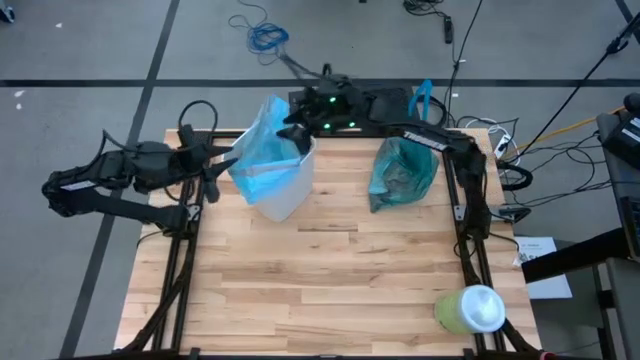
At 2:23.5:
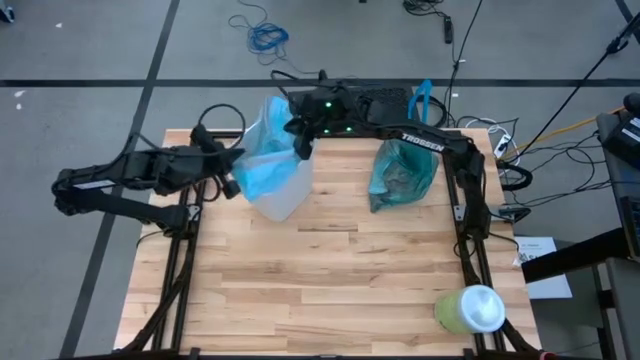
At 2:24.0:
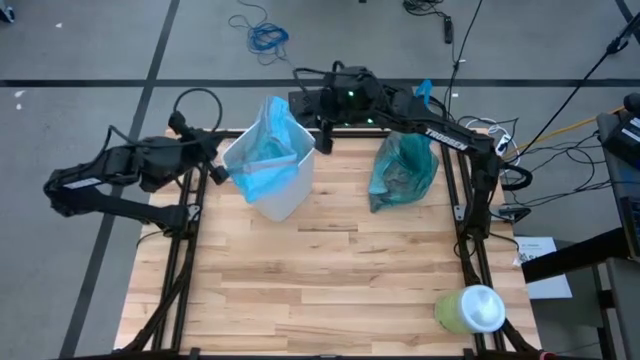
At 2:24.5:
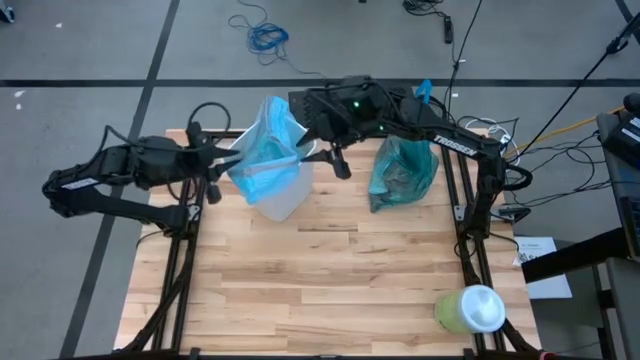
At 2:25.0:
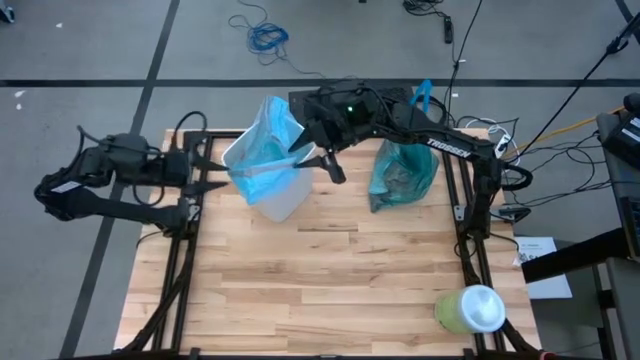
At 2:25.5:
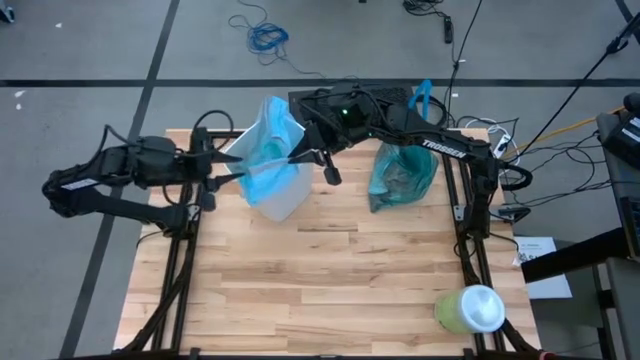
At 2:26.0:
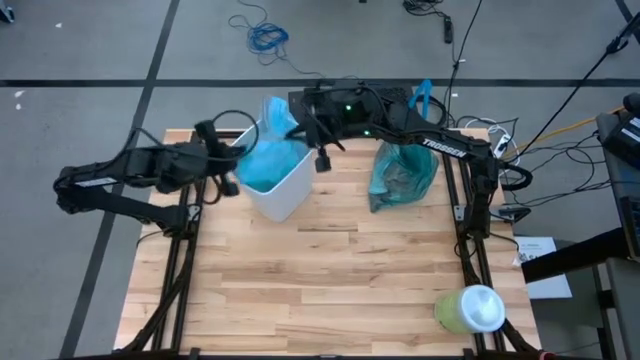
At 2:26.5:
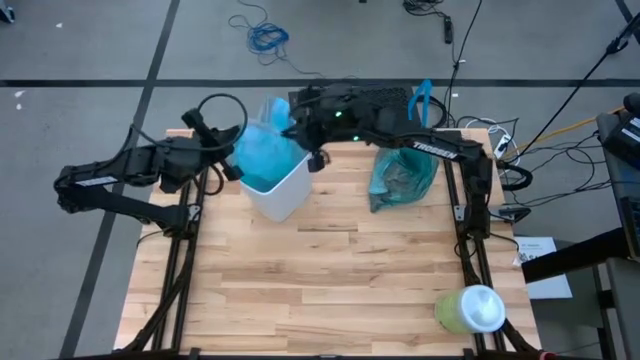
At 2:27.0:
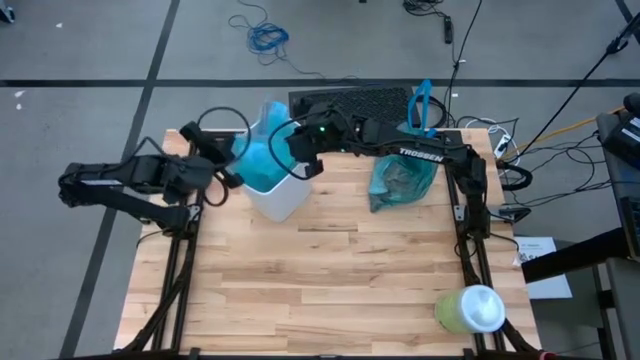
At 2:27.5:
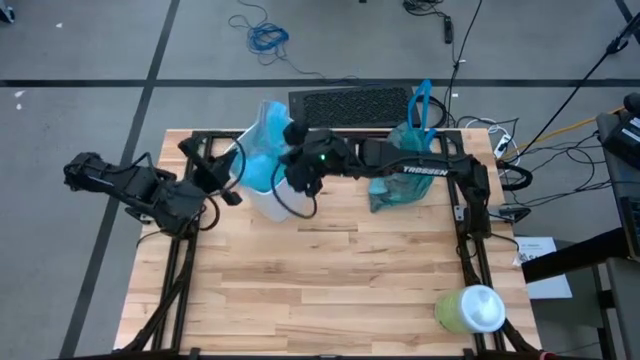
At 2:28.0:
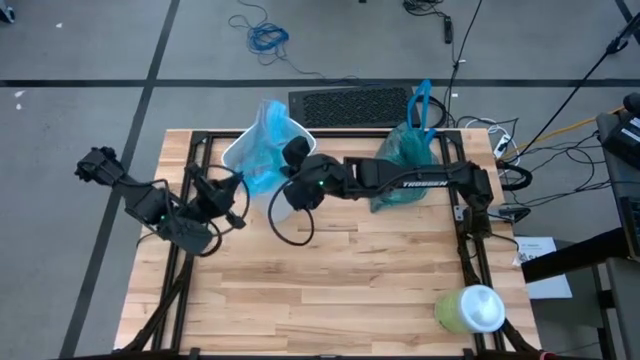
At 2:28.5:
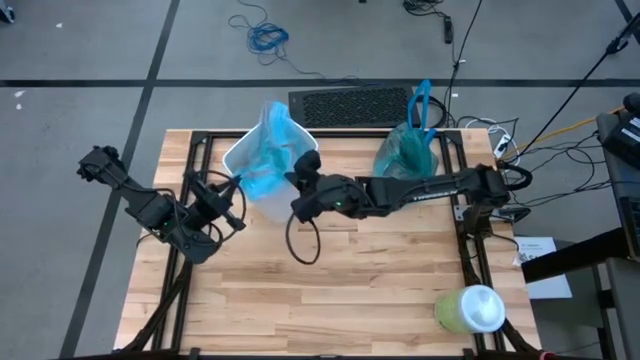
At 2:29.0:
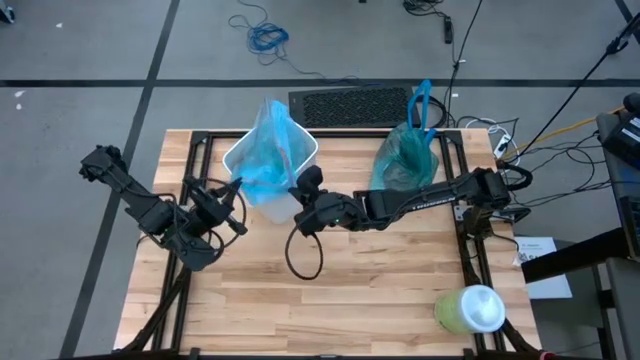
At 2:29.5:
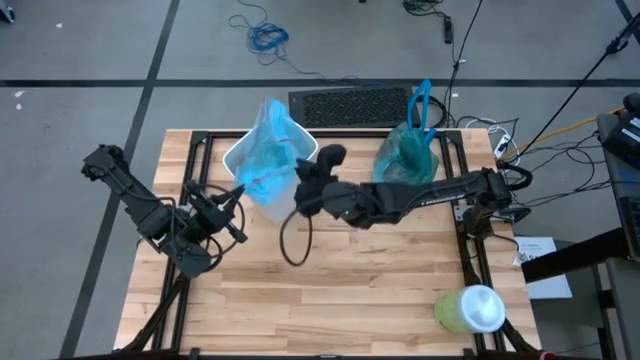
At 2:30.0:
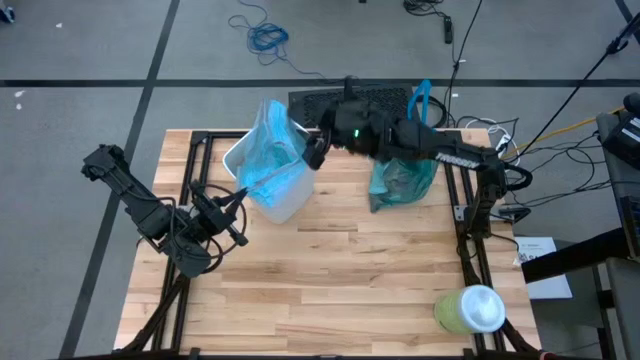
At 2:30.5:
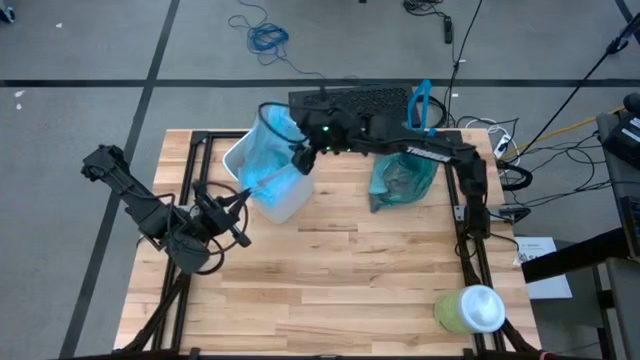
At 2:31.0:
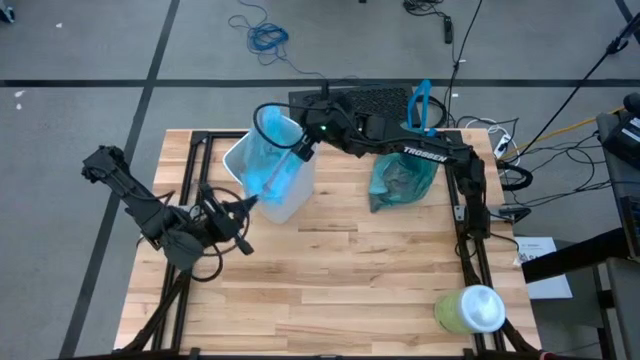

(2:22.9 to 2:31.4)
Task: place trash/remove bag and relplace
Insert a new trash bag into the trash bin

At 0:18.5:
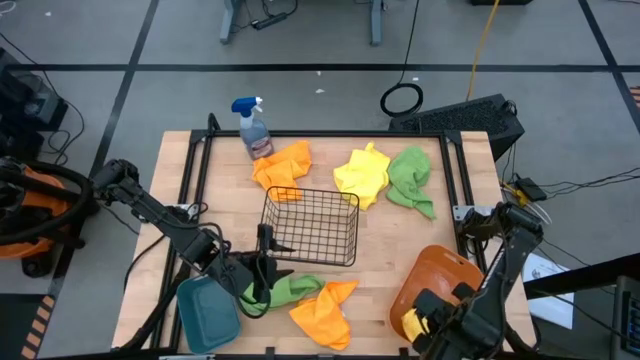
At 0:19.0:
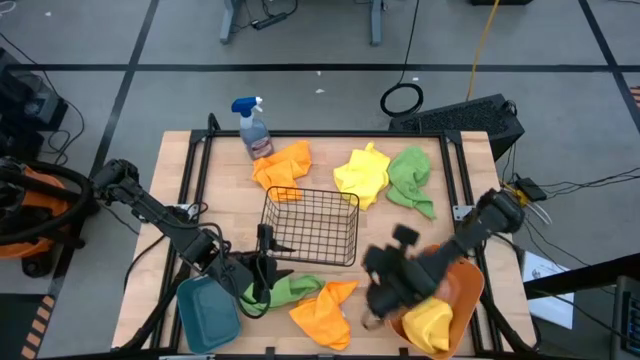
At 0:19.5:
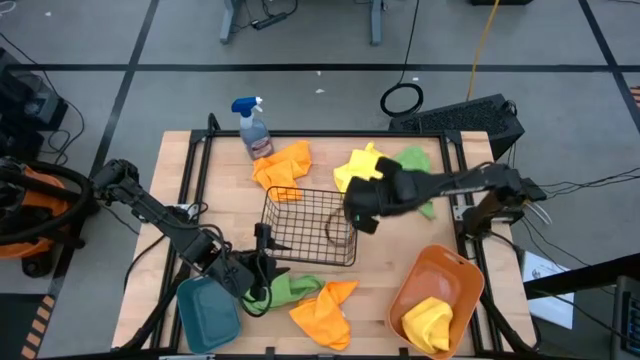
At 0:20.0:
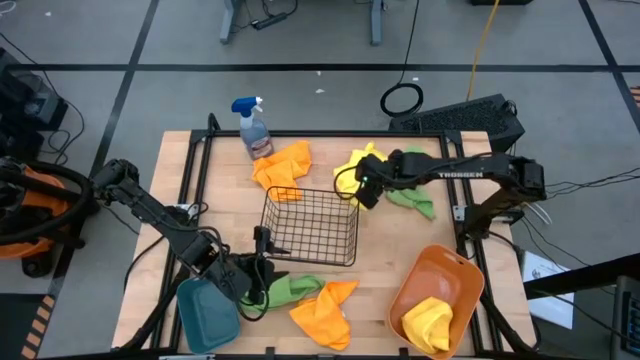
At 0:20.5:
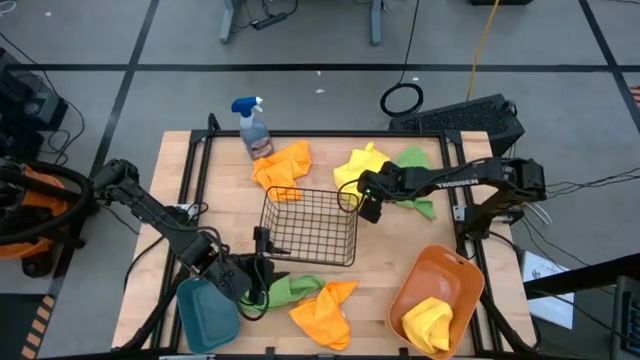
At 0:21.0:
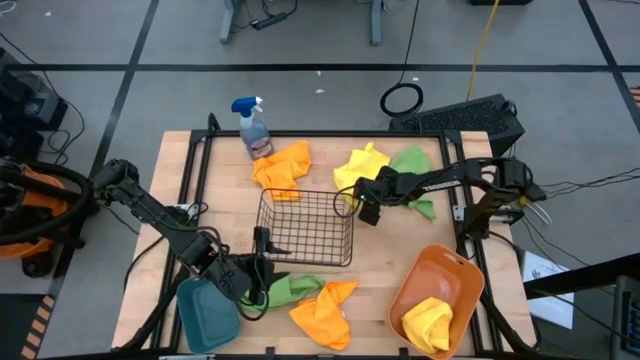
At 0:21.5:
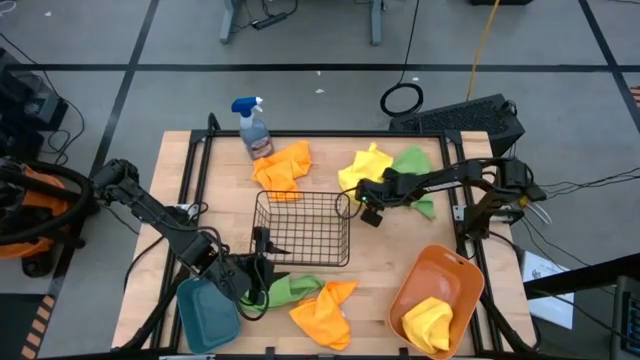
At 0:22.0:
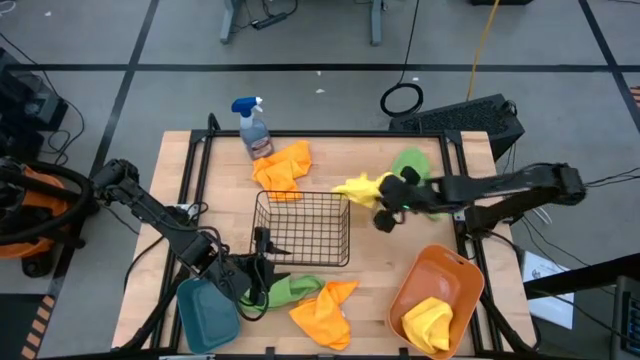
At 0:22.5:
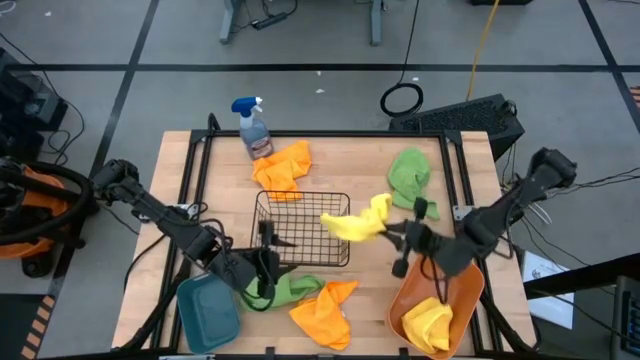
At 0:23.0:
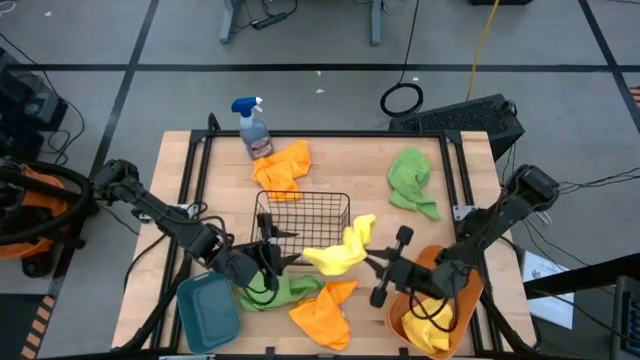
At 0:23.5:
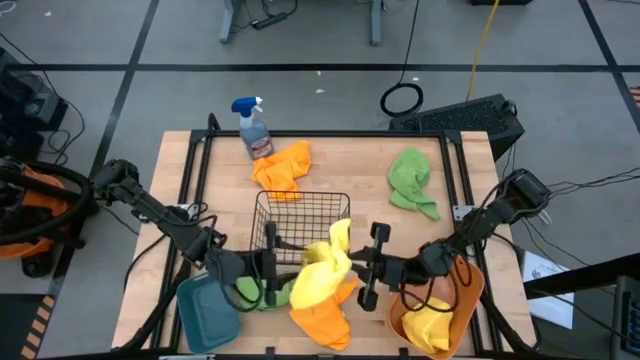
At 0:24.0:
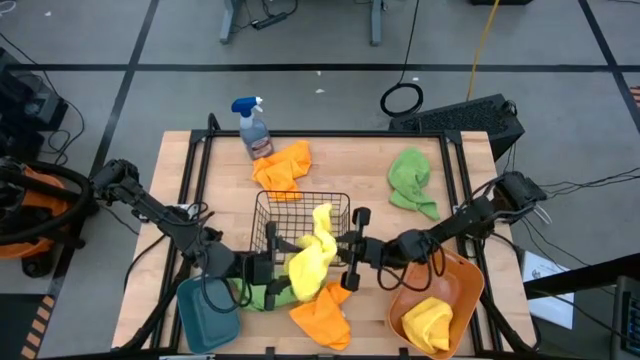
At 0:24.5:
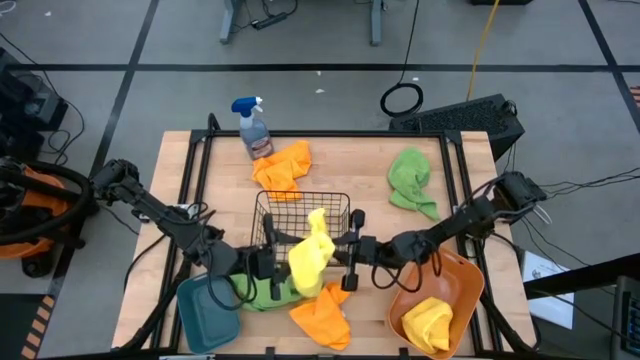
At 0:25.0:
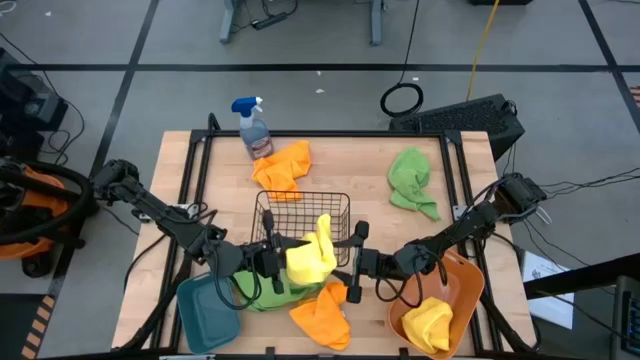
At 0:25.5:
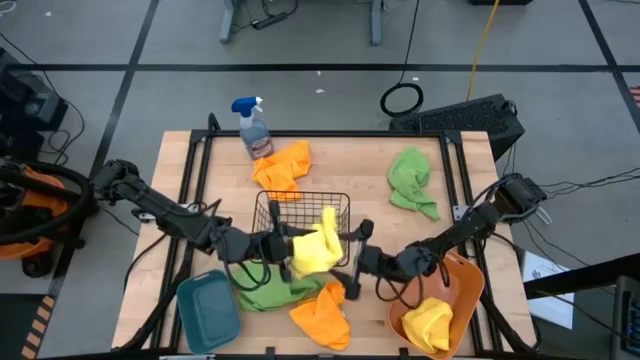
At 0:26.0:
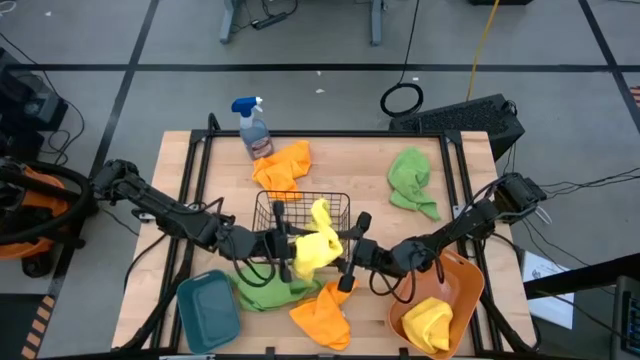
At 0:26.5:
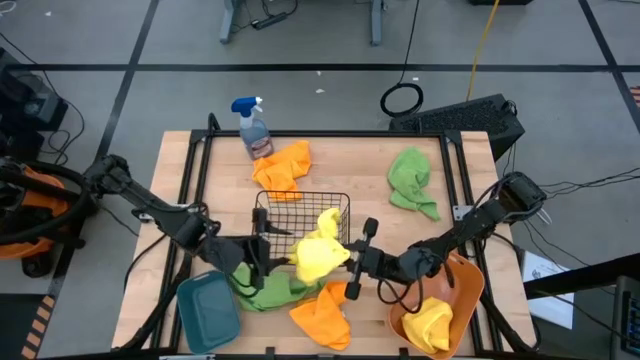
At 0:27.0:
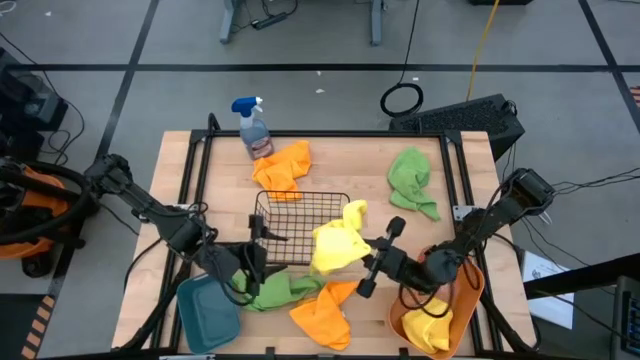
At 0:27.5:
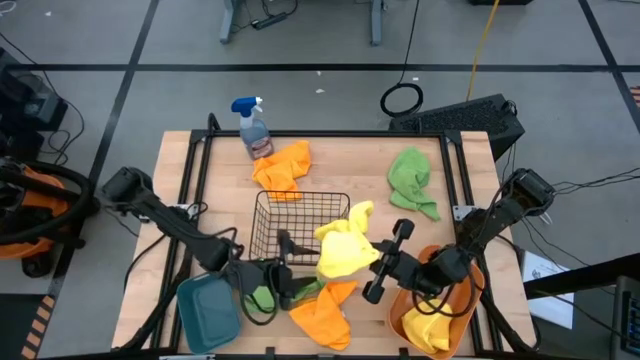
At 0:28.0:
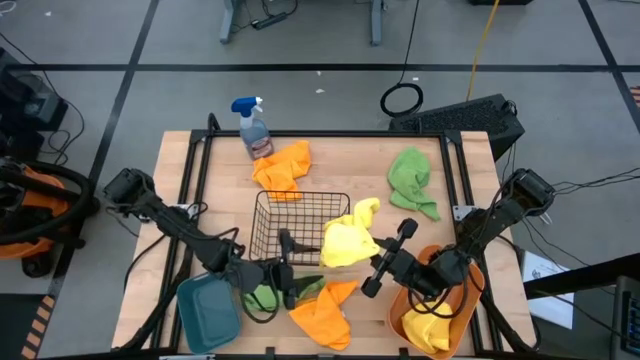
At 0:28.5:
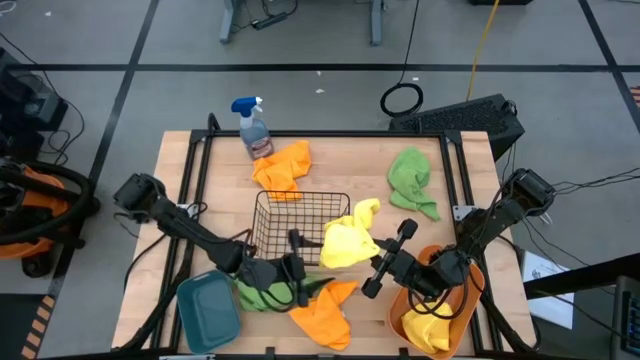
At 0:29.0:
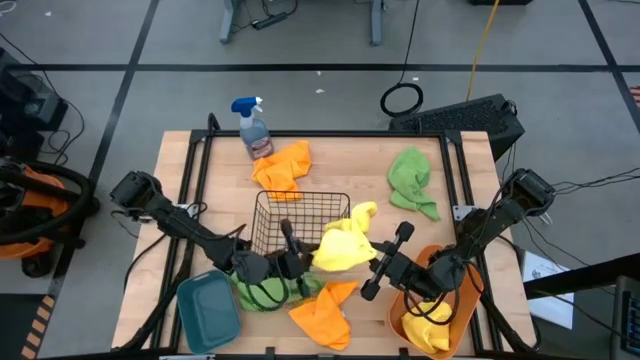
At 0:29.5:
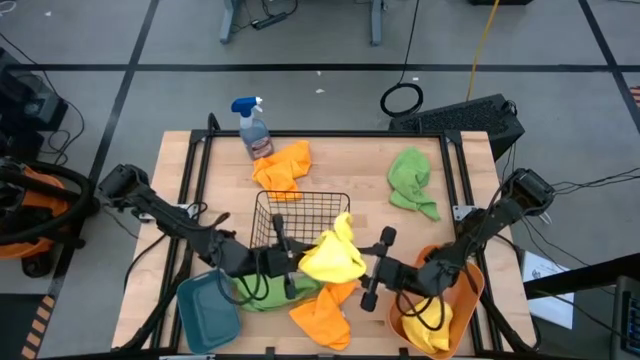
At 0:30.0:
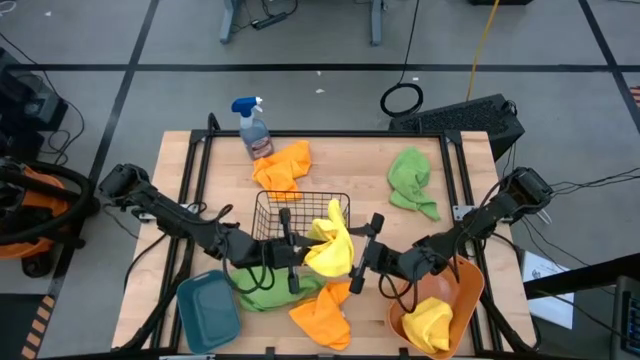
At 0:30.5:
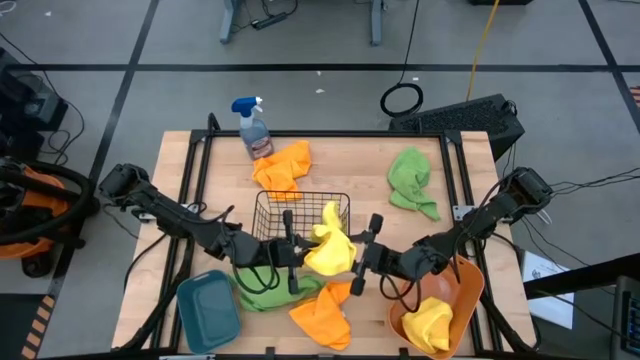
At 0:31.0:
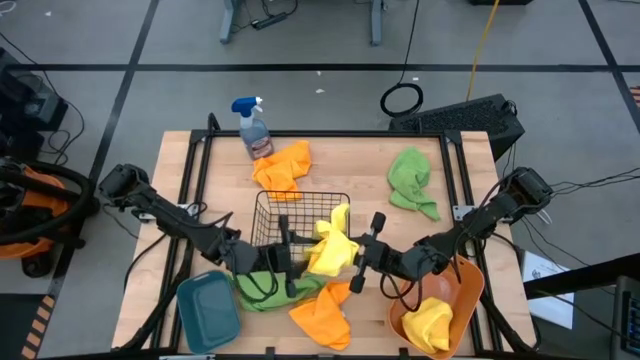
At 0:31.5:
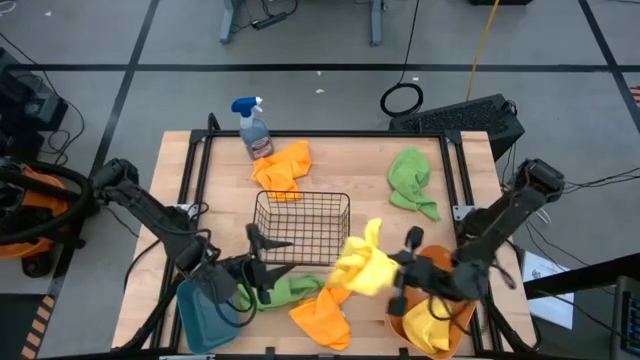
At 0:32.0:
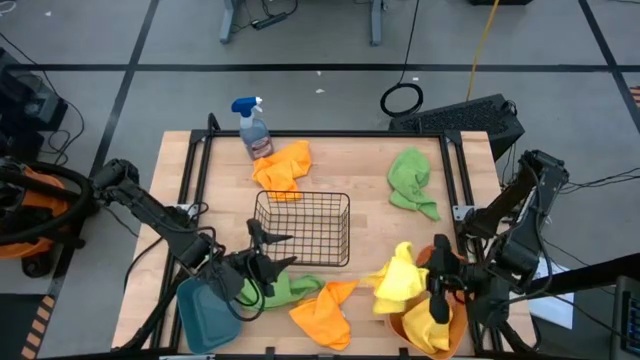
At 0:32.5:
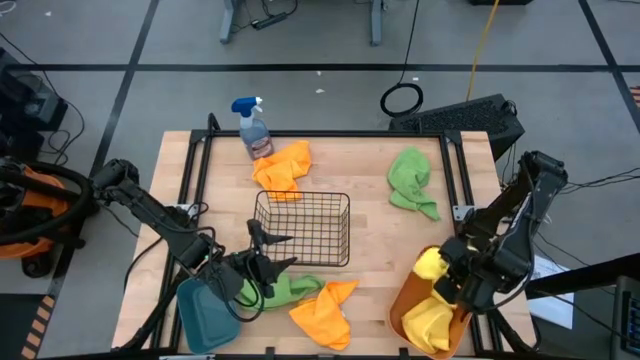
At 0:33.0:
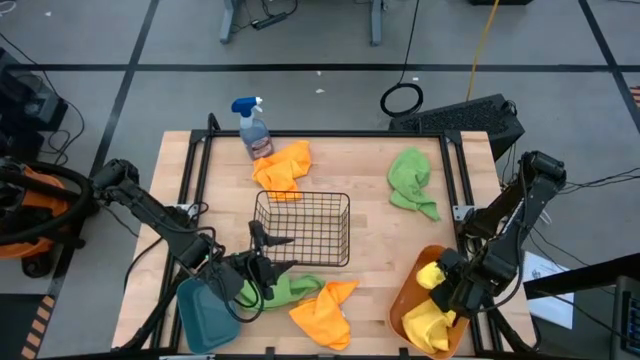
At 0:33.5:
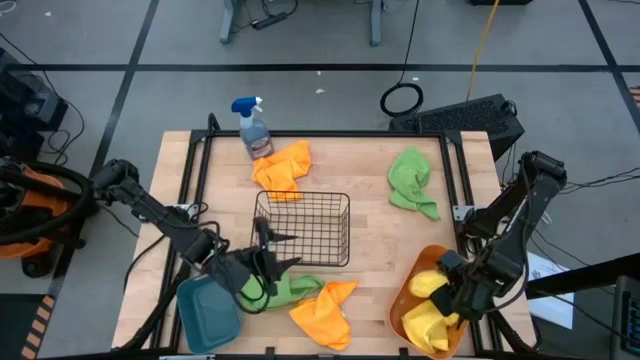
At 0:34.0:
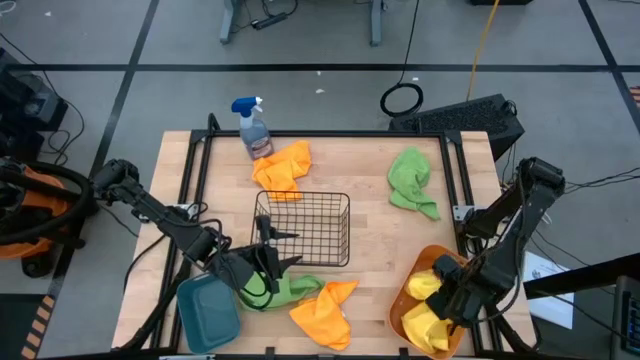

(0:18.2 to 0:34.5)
Task: Sort microfiber towel by color & place in baskets
Put the yellow microfiber cloth into the orange bin
